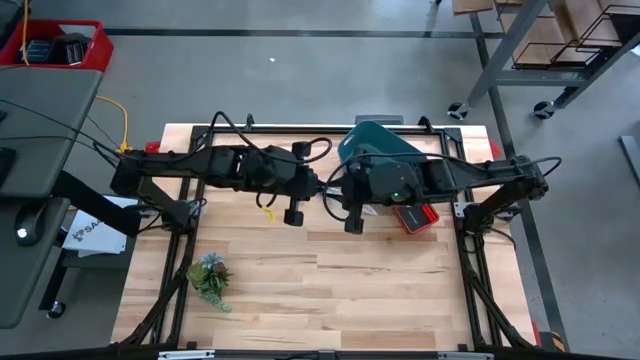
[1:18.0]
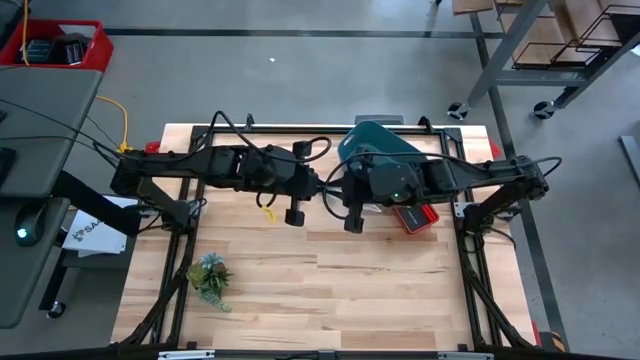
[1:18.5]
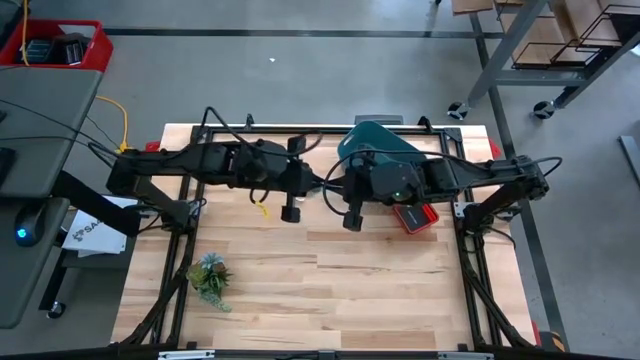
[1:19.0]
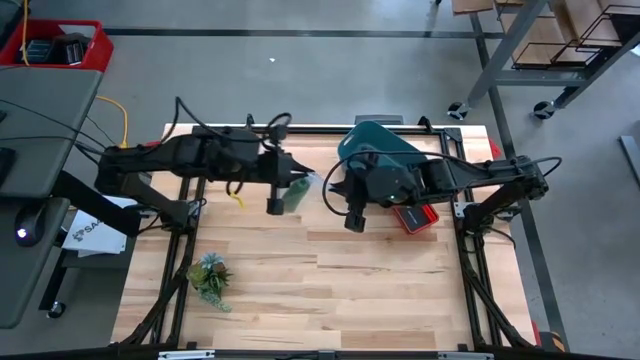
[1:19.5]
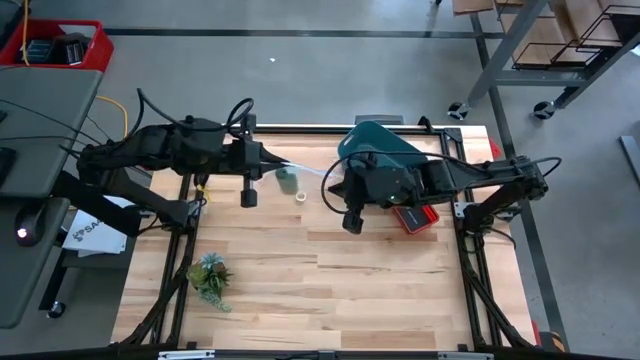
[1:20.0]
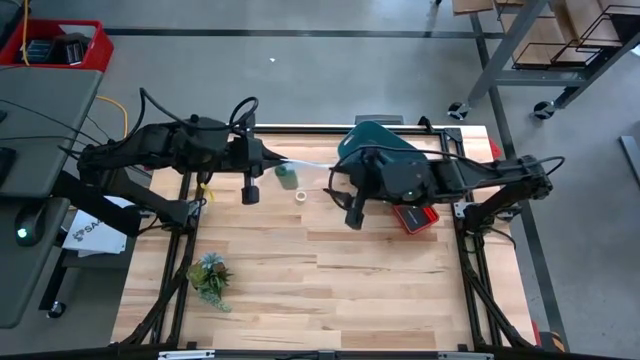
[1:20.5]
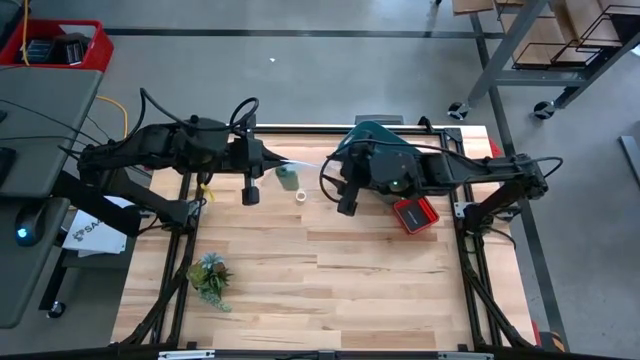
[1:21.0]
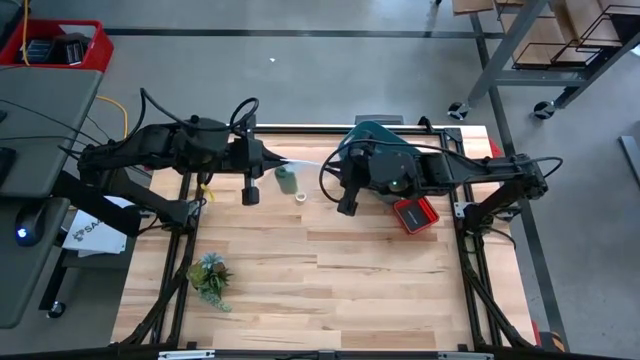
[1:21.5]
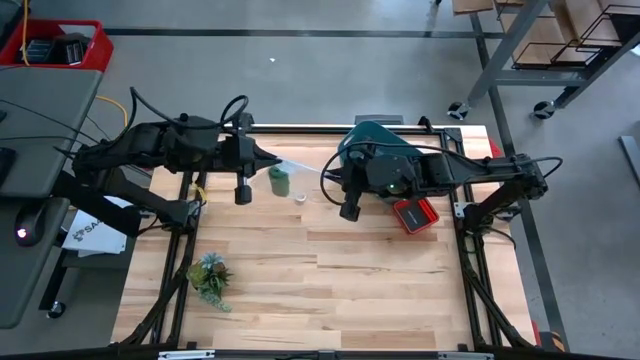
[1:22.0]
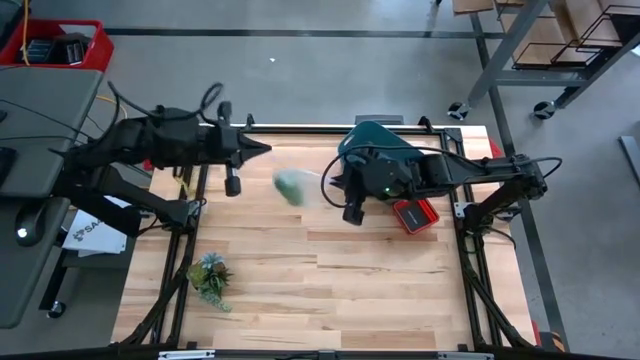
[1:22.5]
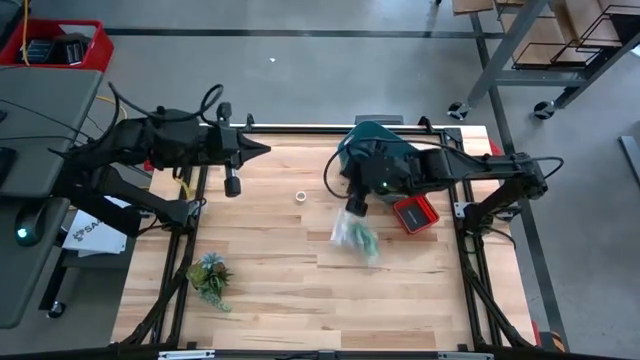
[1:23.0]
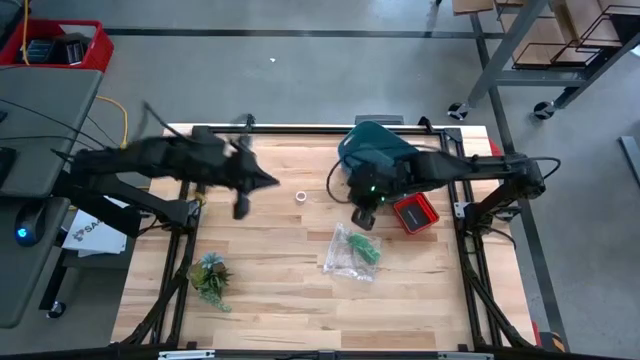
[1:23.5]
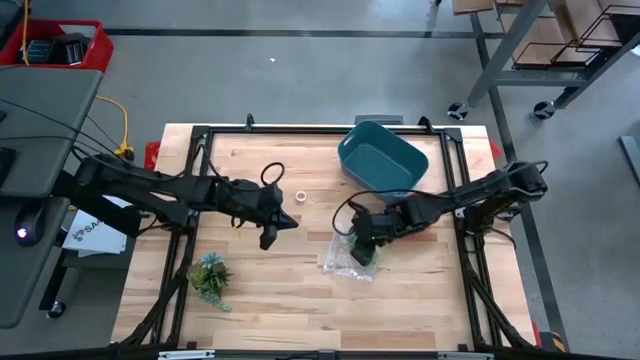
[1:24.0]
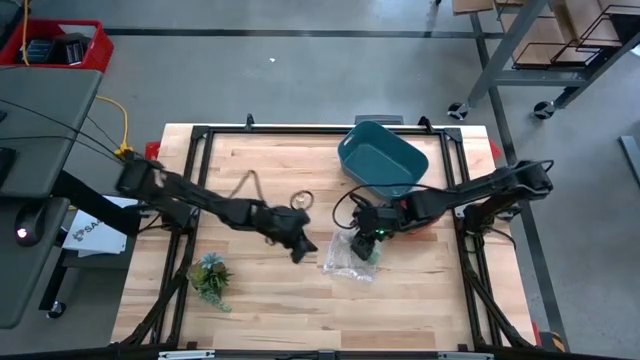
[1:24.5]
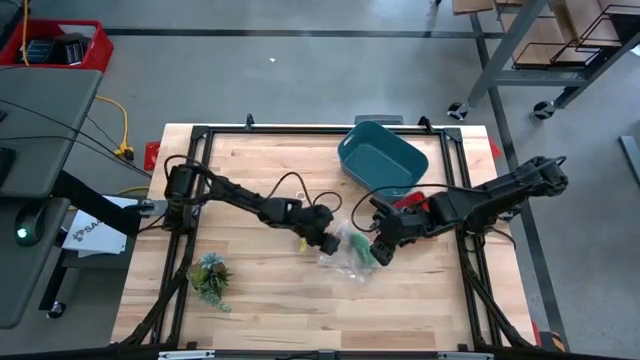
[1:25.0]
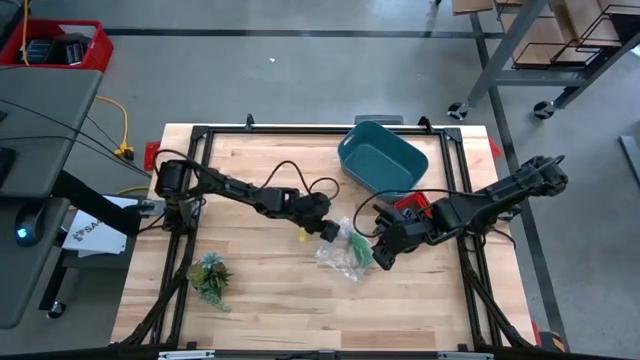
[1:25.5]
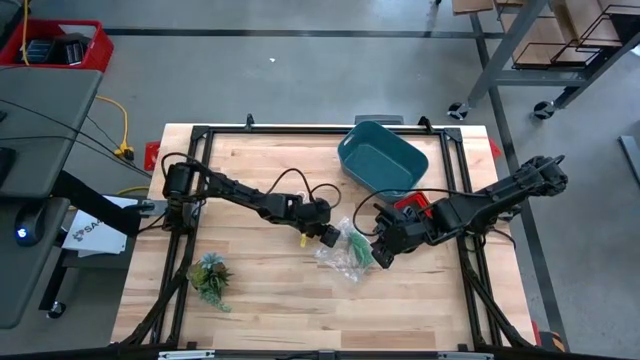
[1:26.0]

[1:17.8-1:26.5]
Task: Roll bandage
Close the transparent zip bag

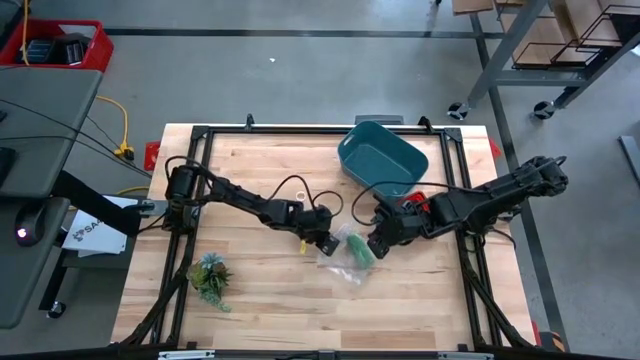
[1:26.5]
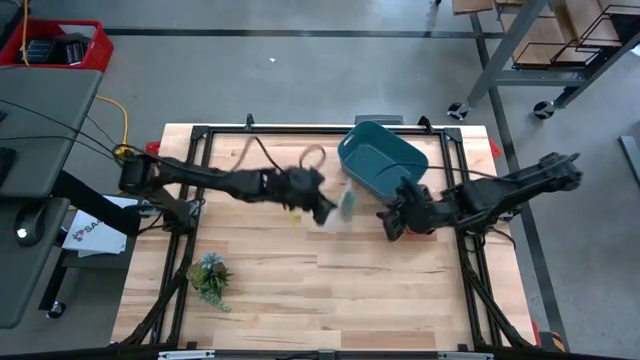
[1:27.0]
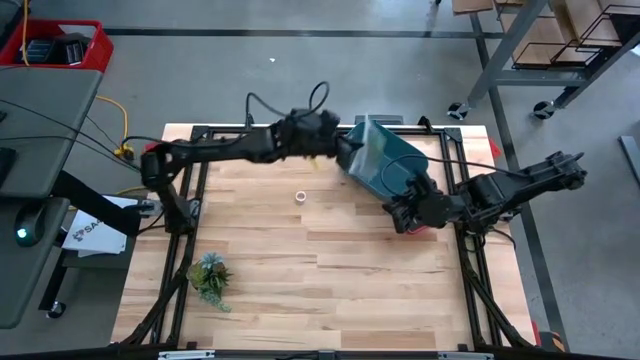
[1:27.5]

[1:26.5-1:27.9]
Put the transparent zip bag into the blue bin

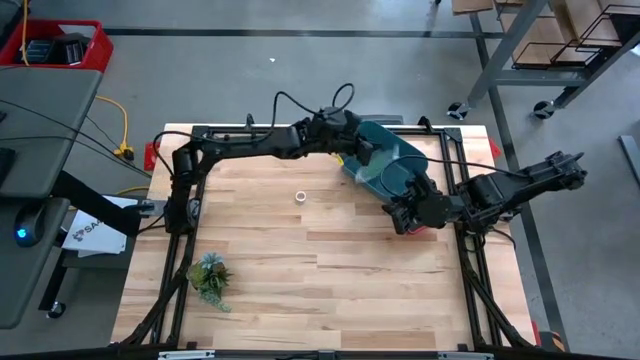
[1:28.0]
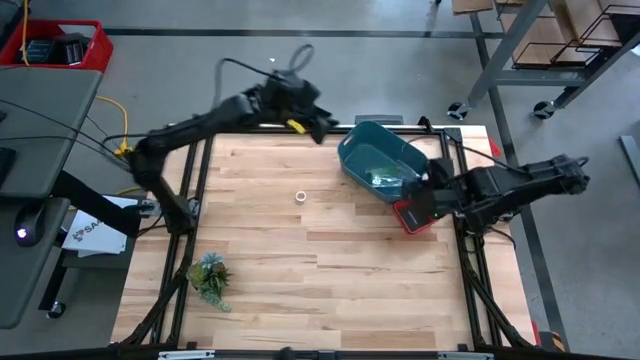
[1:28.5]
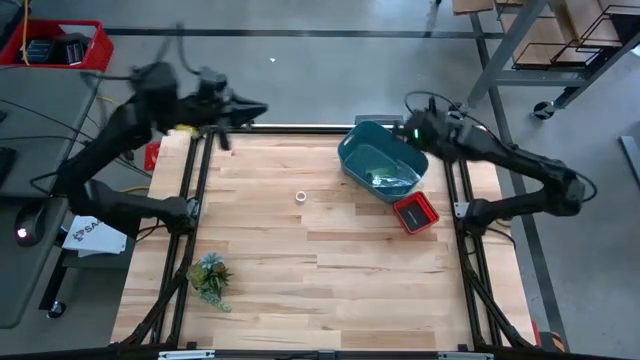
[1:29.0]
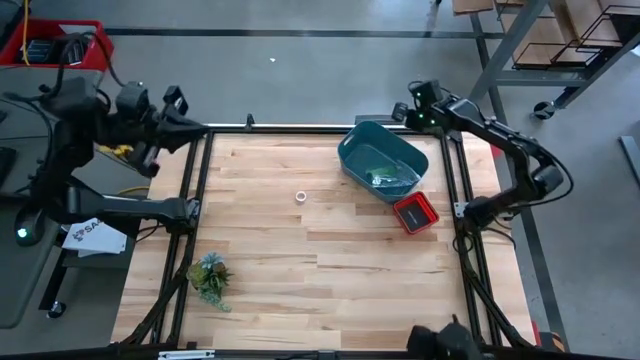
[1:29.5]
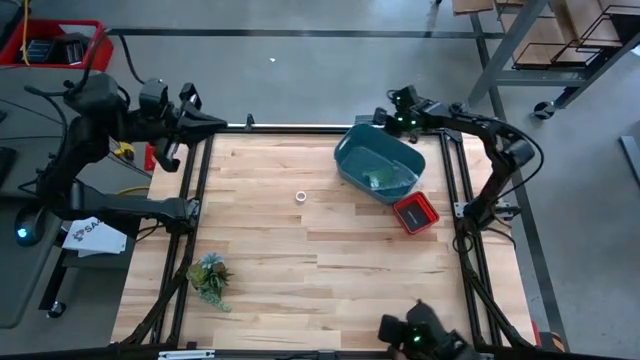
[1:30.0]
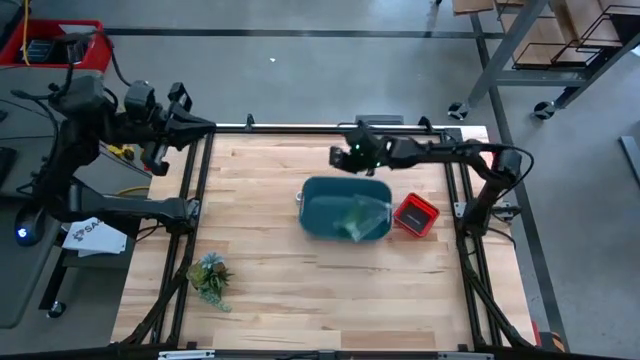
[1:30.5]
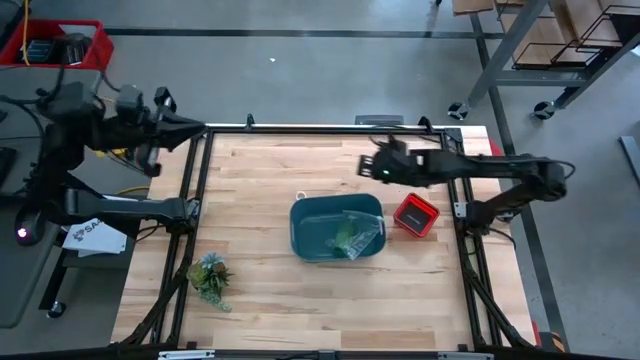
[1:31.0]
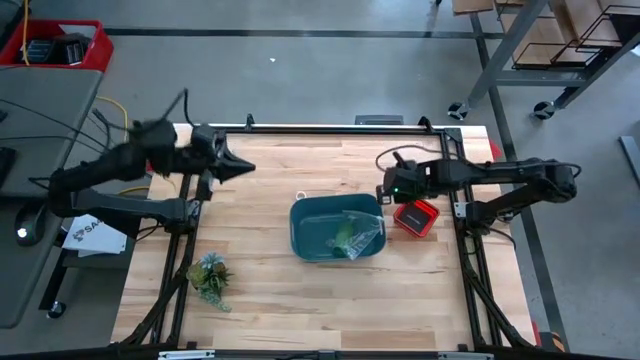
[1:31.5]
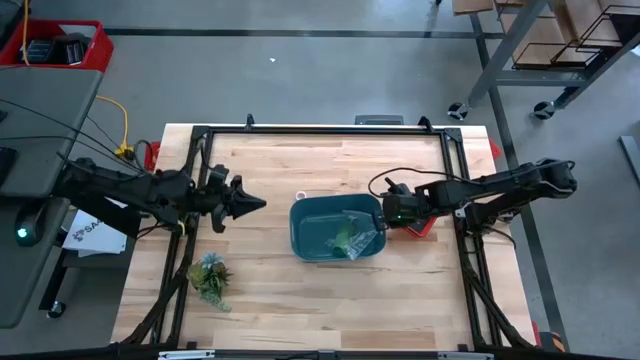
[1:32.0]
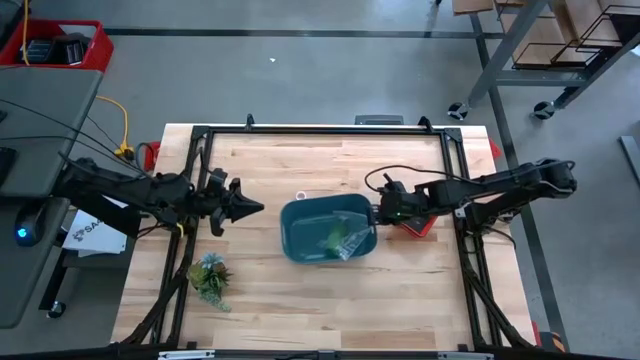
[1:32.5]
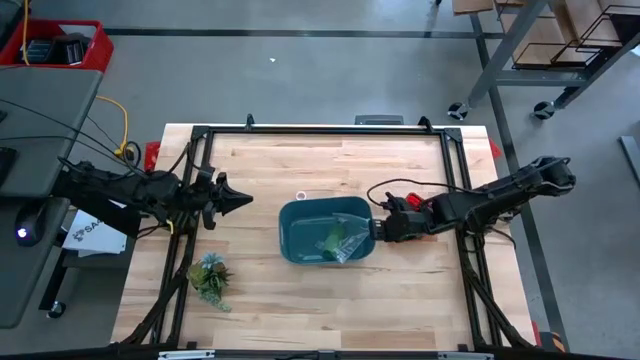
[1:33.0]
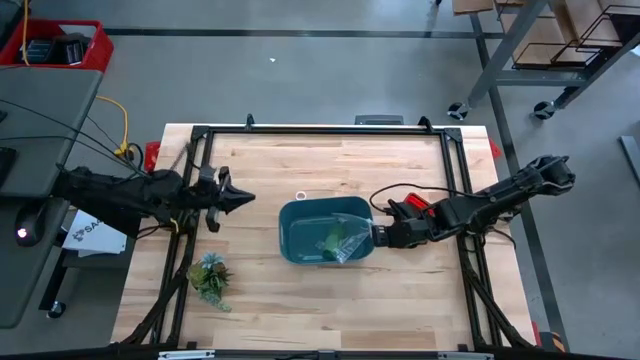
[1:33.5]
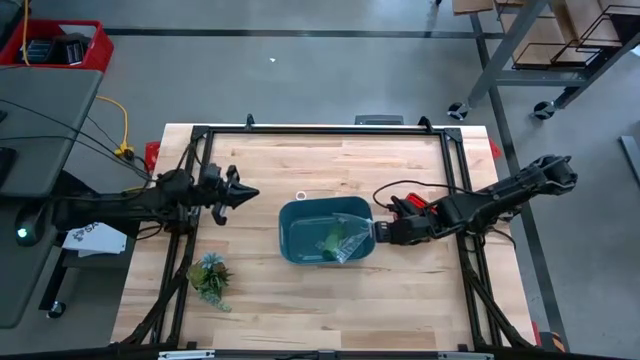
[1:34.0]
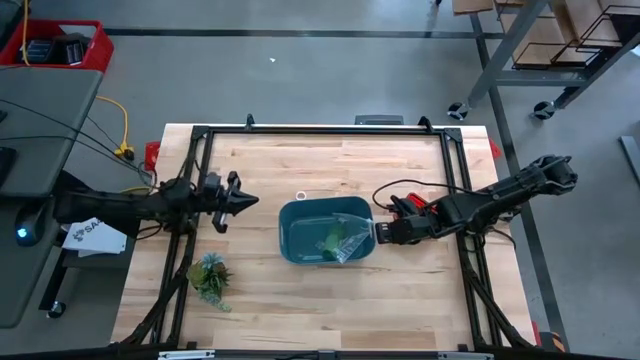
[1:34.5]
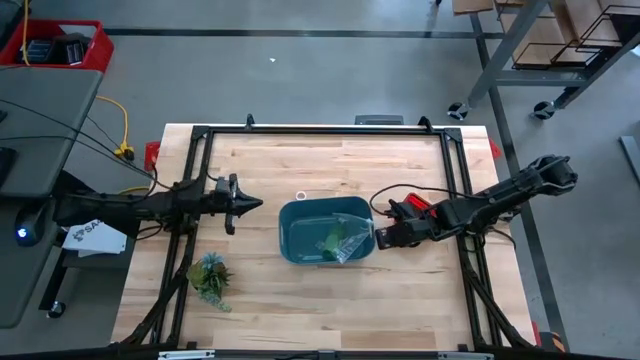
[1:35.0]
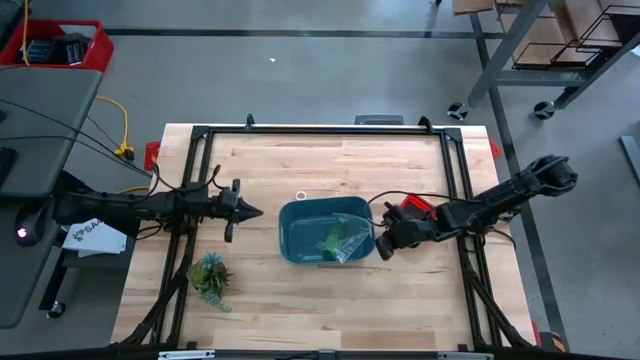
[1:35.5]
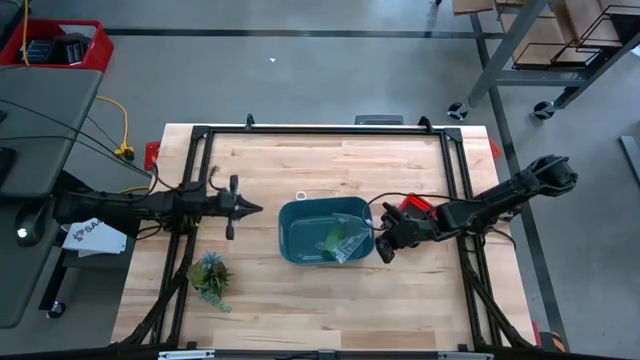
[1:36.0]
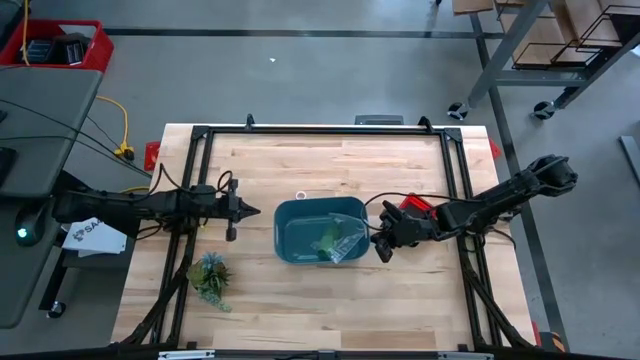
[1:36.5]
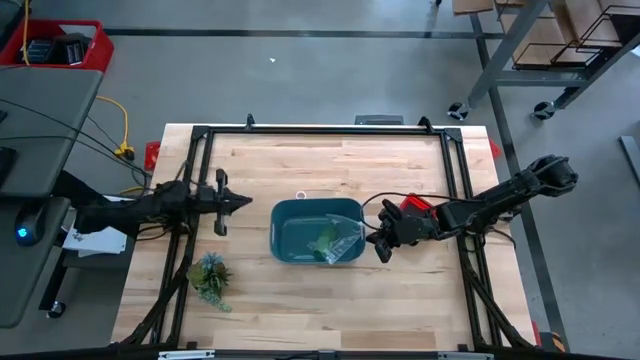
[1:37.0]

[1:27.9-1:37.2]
Move the blue bin to the center of the table

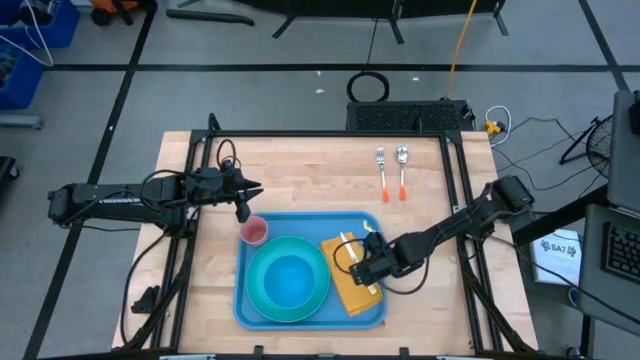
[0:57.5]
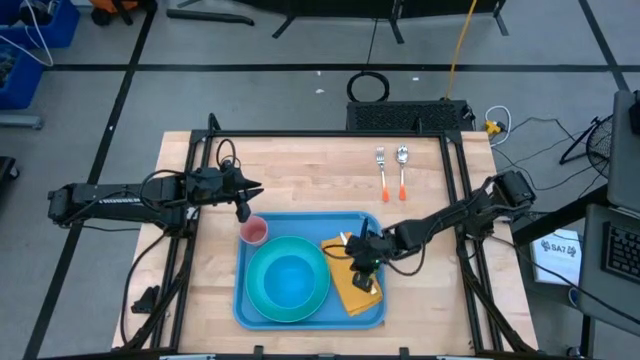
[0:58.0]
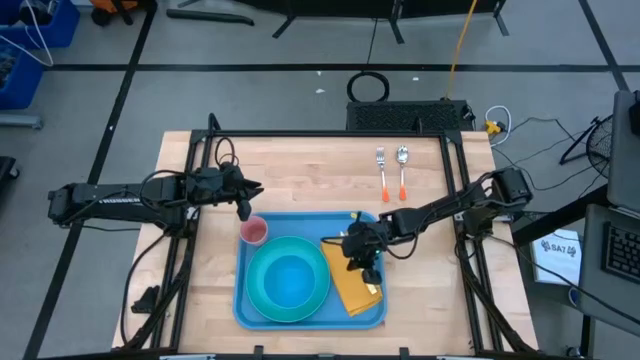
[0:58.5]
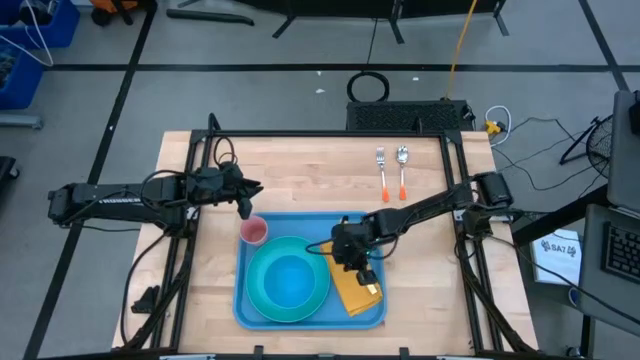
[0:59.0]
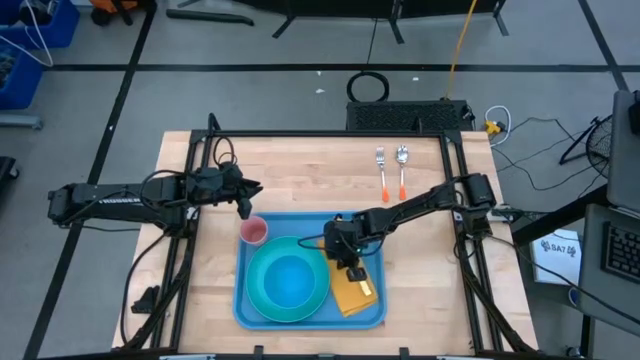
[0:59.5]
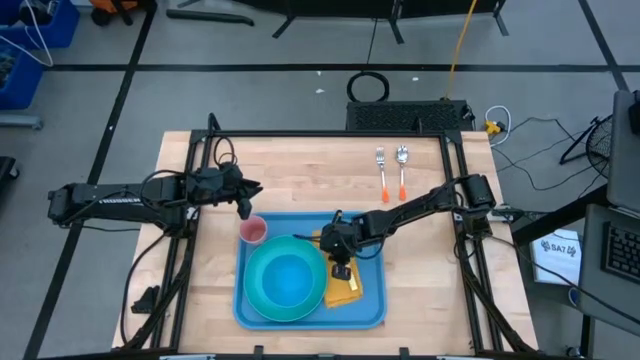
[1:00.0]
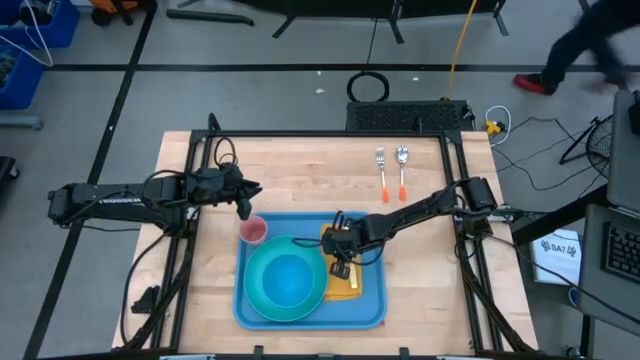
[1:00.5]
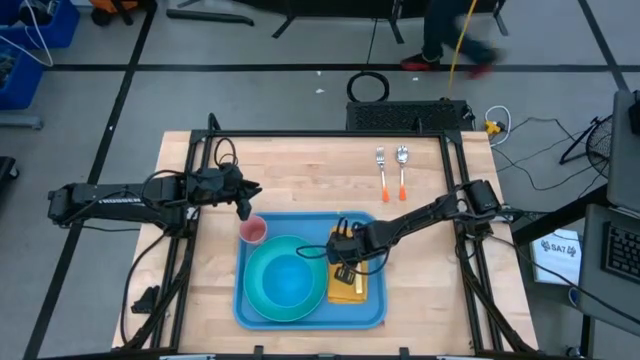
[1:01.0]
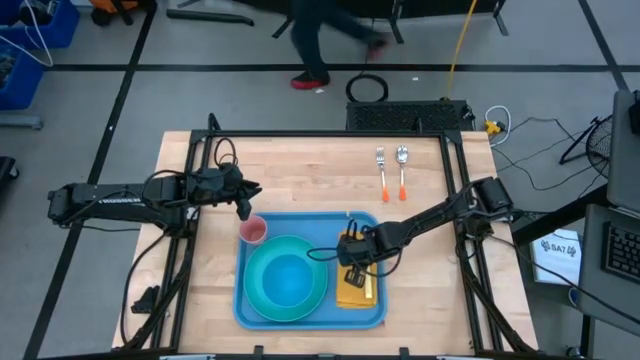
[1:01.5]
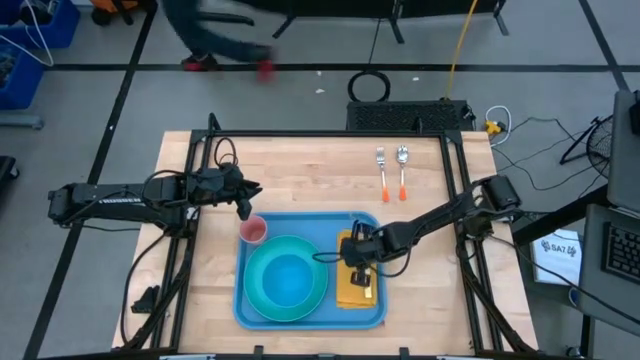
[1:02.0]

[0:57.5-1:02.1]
Task: Set up tray
Adjust the yellow napkin on the blue serving tray
